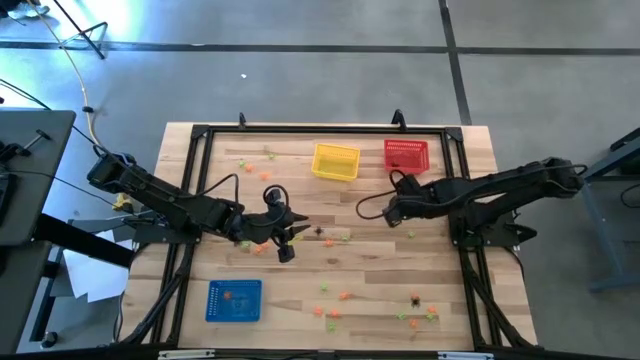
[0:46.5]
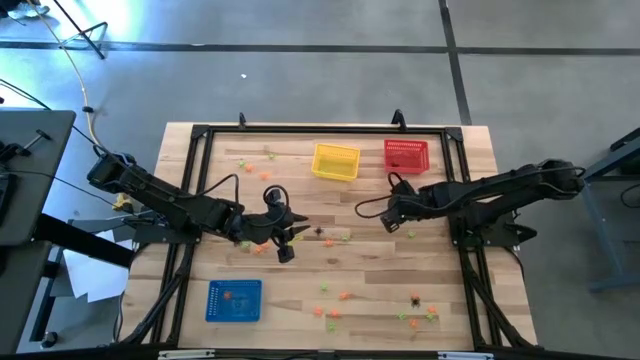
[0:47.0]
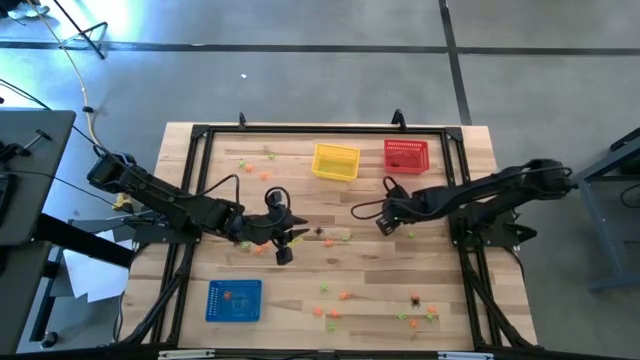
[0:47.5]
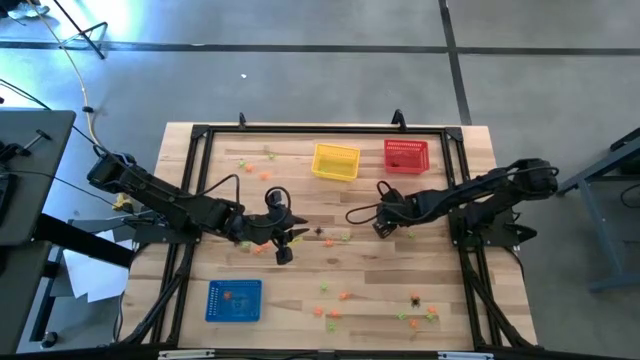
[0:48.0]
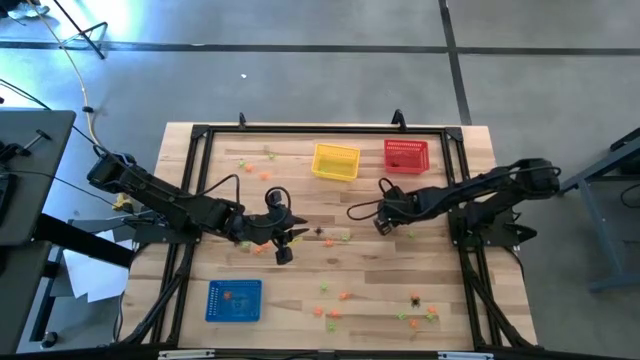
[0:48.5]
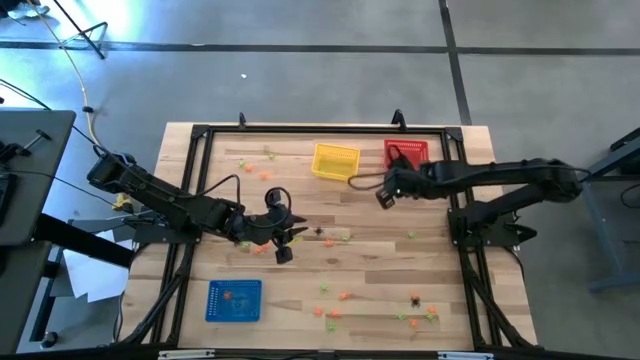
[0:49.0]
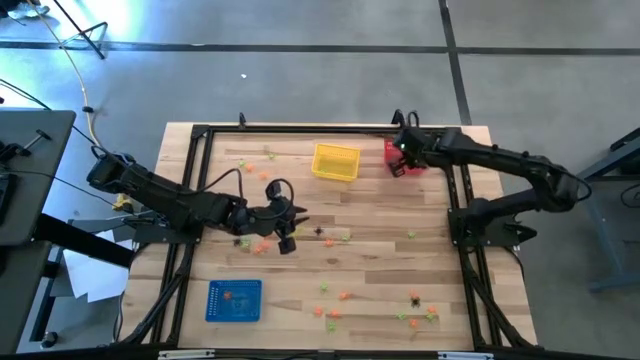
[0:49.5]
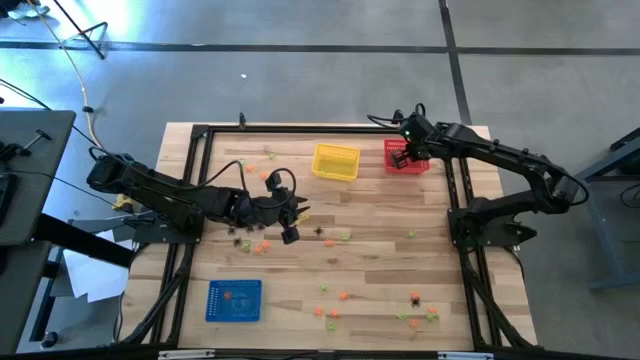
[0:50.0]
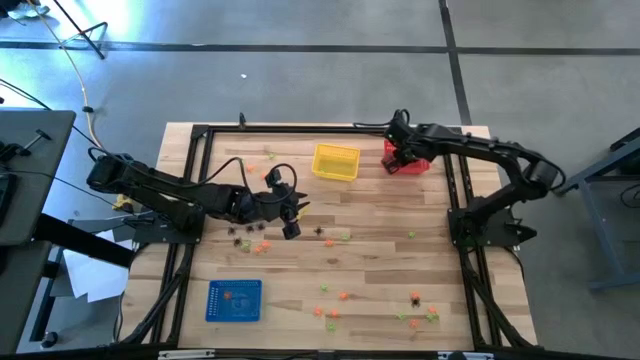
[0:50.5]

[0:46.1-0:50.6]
Task: Sort Halloween decoration
Put the black spider toy into the red bin

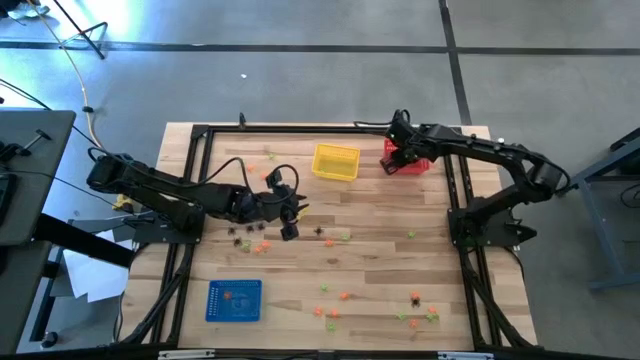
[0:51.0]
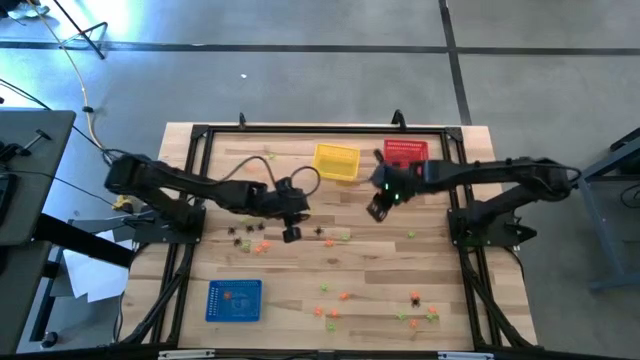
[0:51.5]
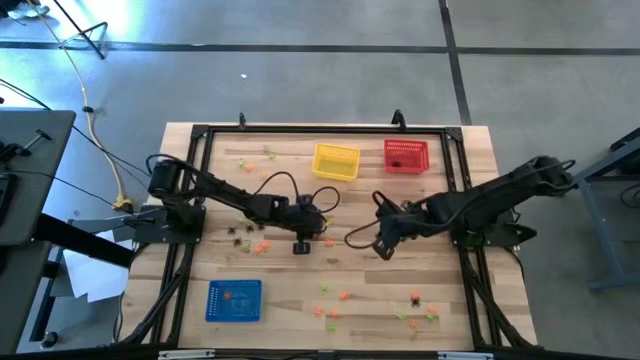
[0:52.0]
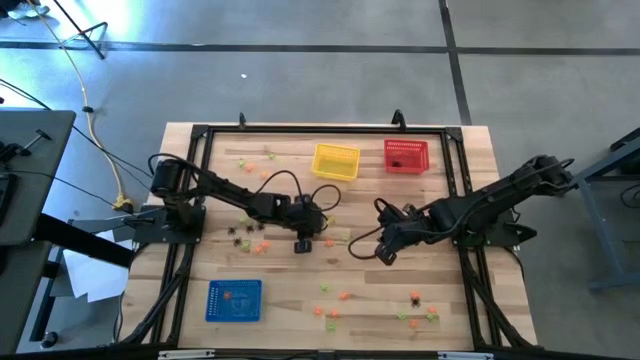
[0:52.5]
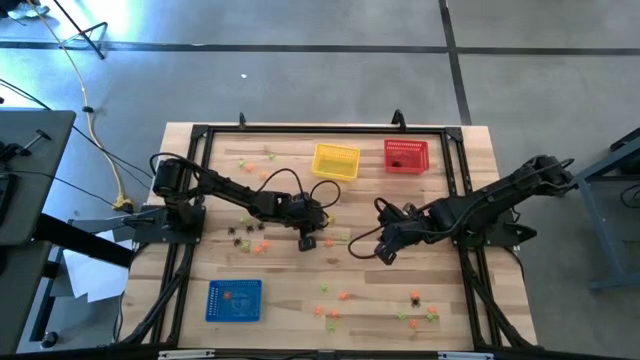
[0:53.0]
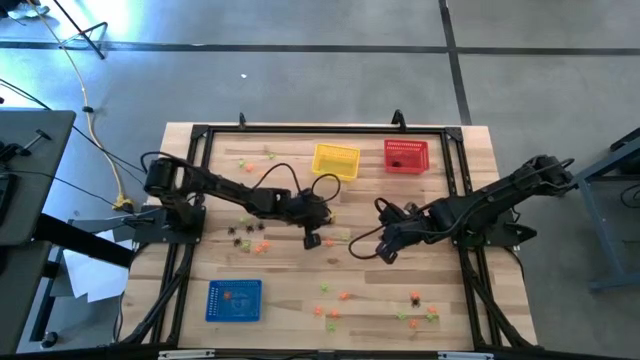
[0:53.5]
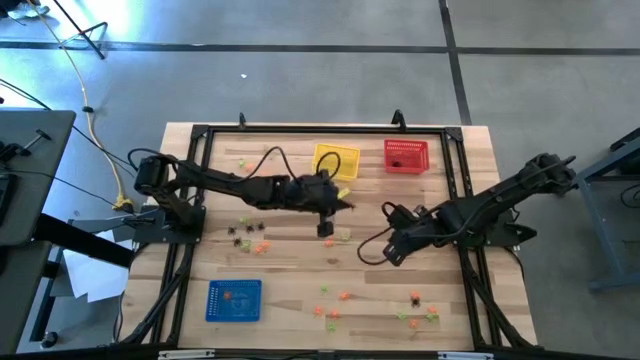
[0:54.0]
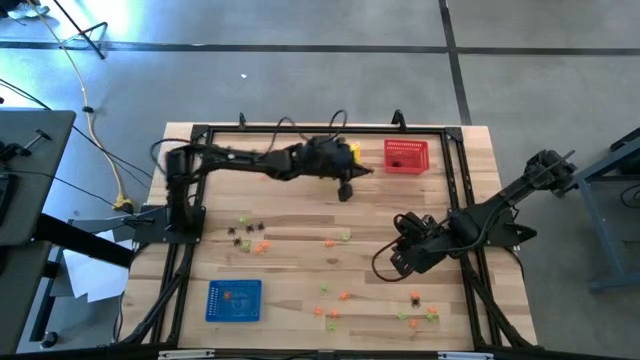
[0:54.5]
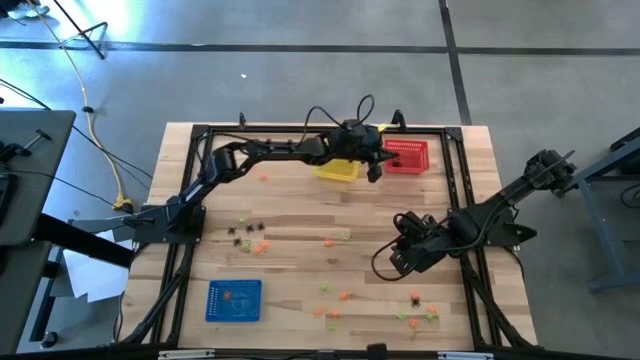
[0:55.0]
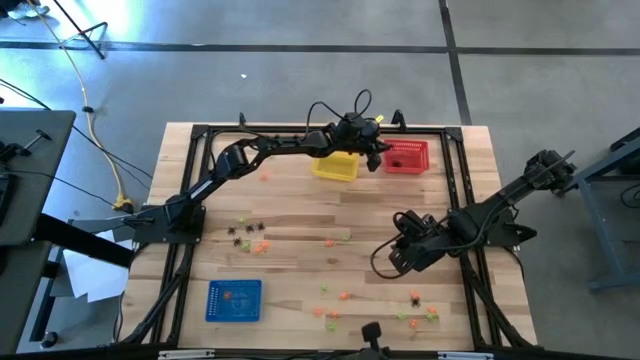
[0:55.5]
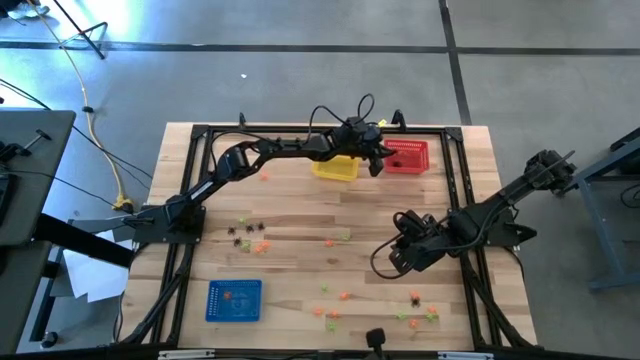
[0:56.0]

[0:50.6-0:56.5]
Put the black spider toy into the red bin

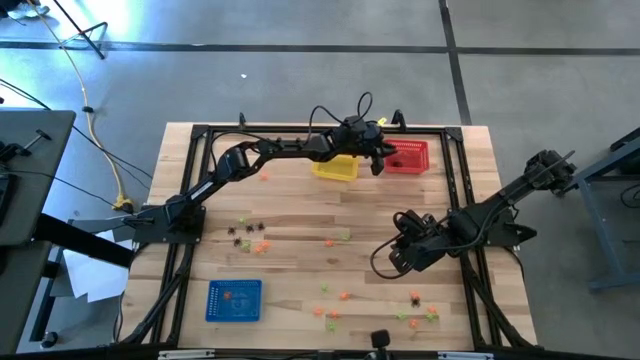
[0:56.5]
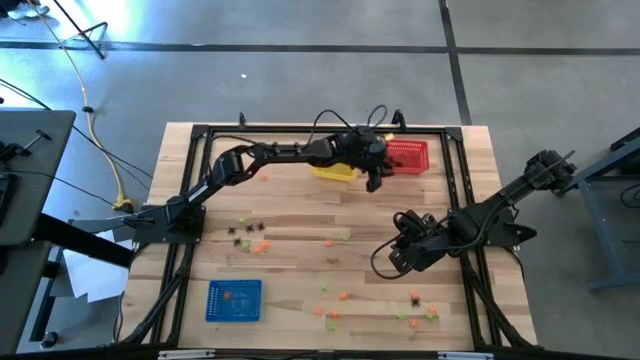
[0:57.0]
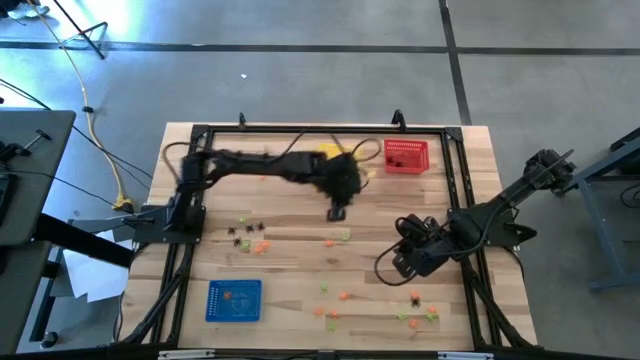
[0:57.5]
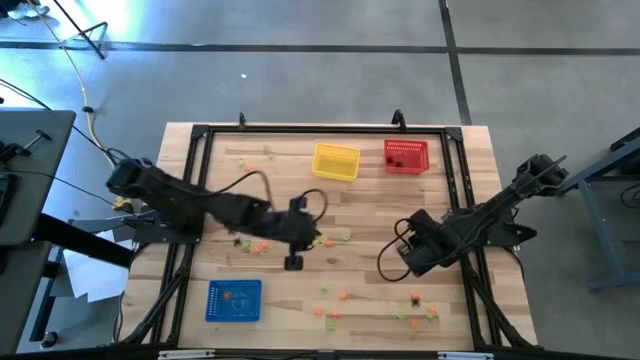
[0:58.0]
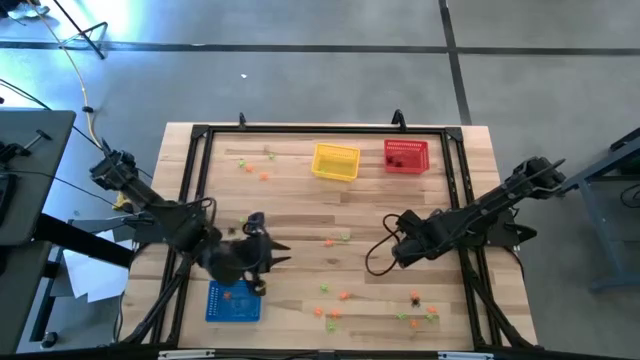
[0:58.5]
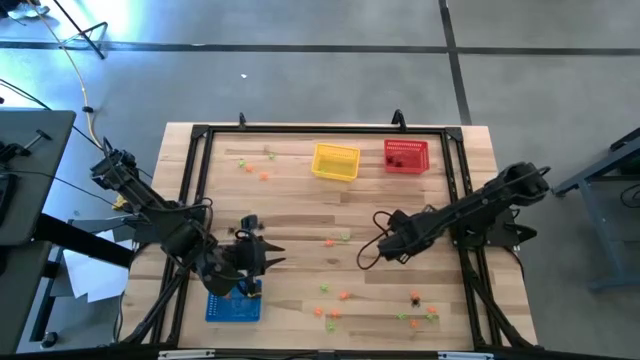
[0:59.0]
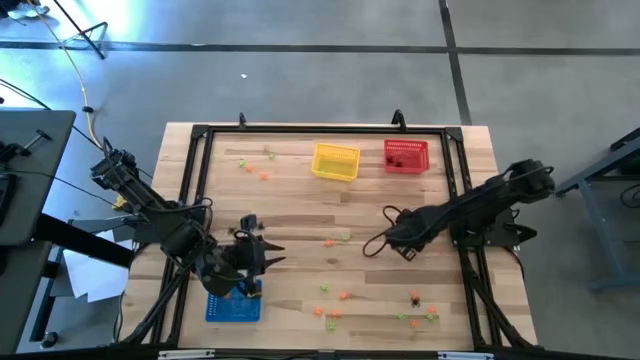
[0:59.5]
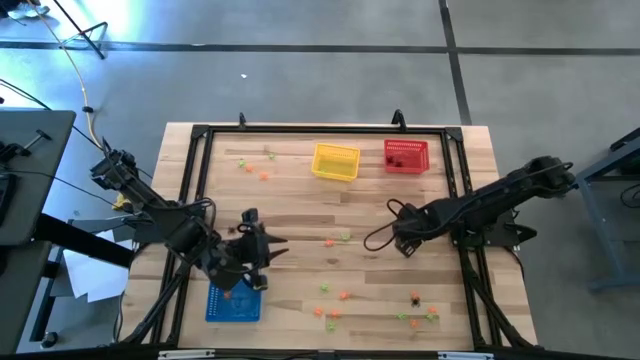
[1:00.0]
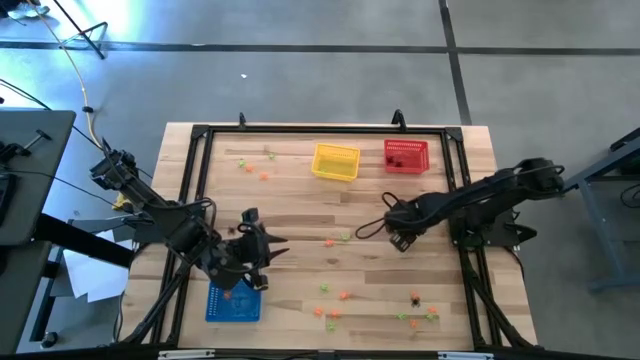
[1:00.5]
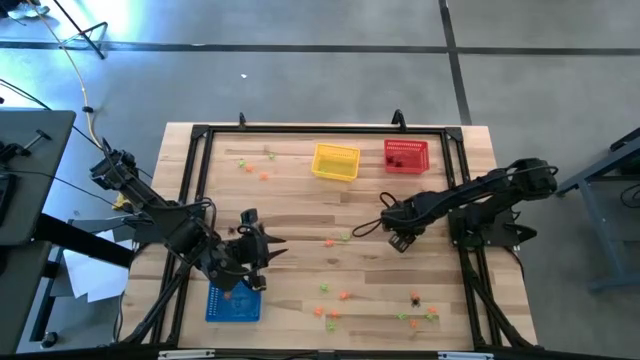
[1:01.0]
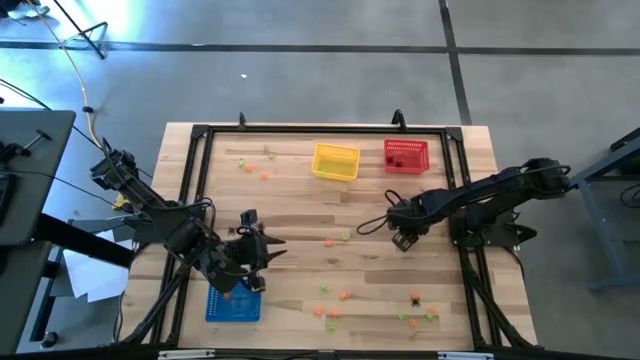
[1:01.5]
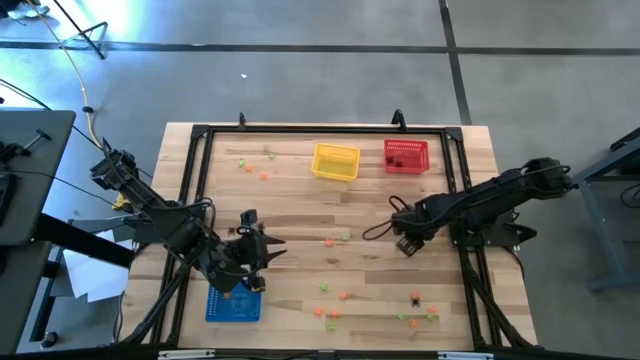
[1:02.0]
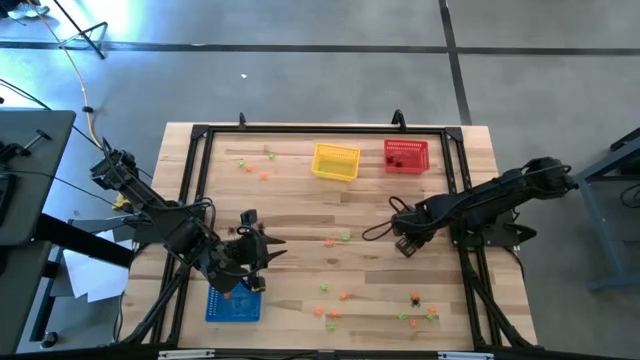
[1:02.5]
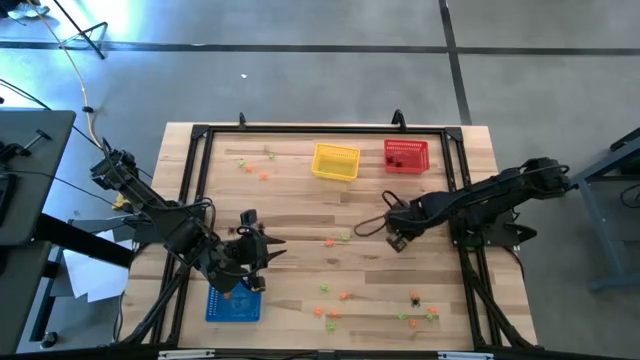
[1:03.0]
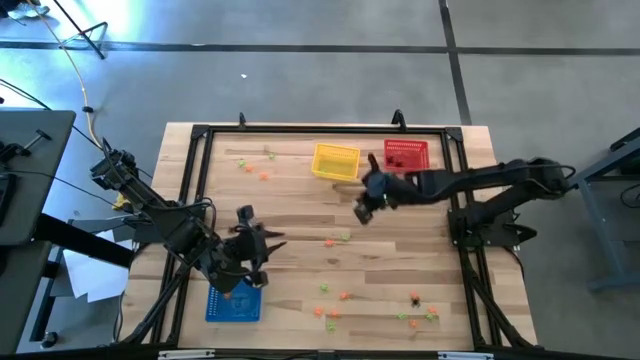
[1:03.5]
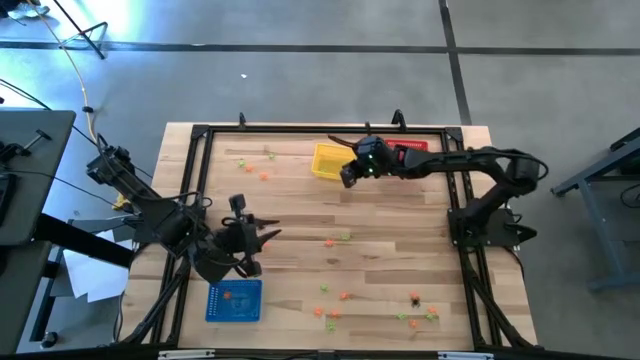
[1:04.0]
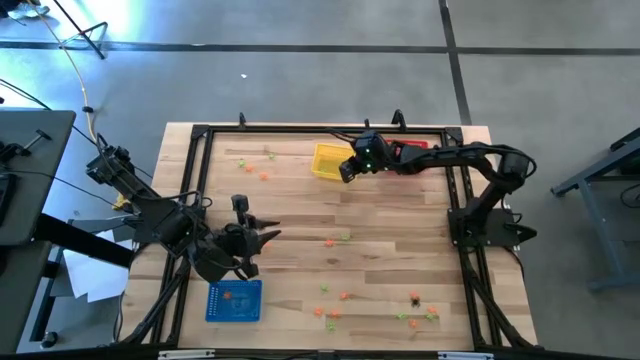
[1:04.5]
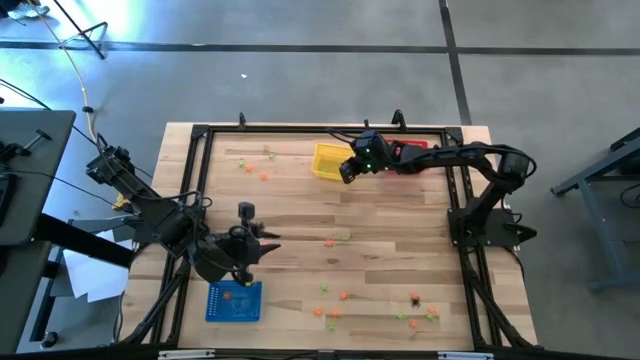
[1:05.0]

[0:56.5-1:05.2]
Put the green spider toy into the yellow bin

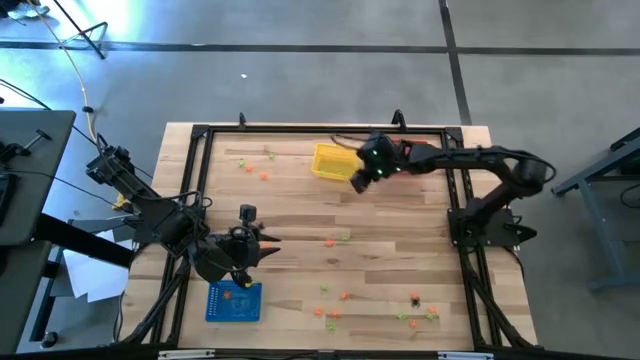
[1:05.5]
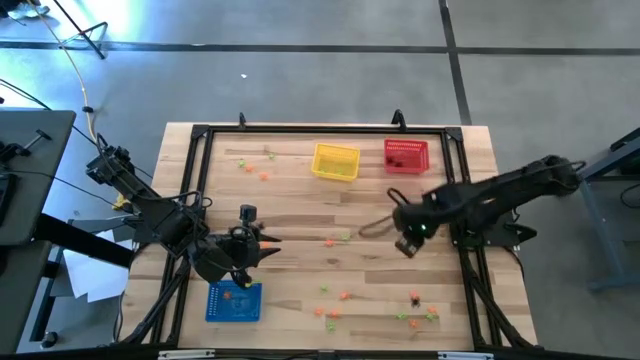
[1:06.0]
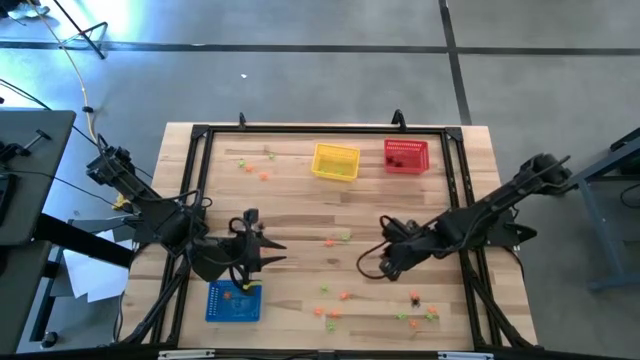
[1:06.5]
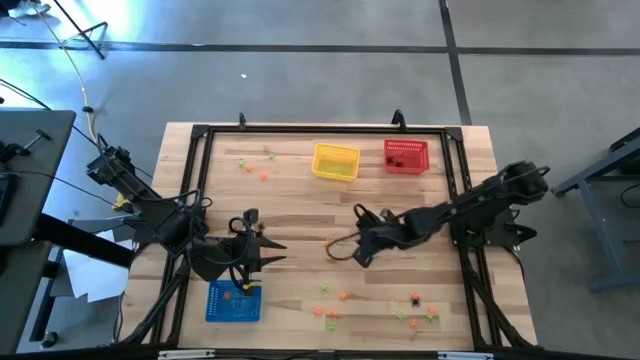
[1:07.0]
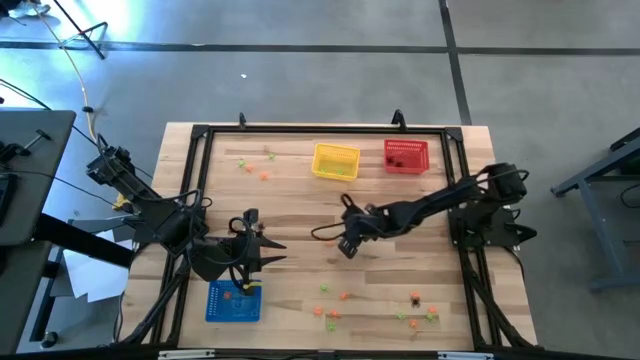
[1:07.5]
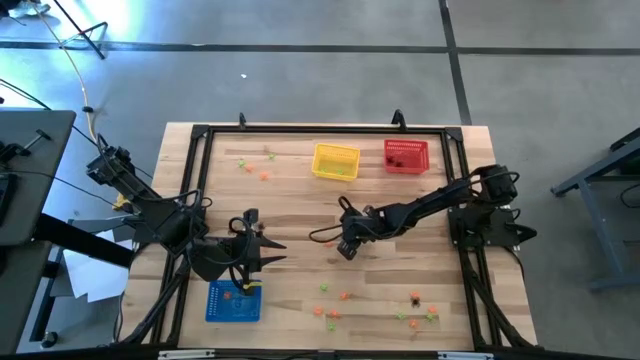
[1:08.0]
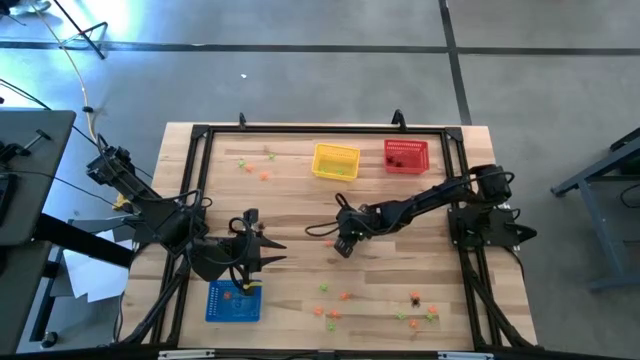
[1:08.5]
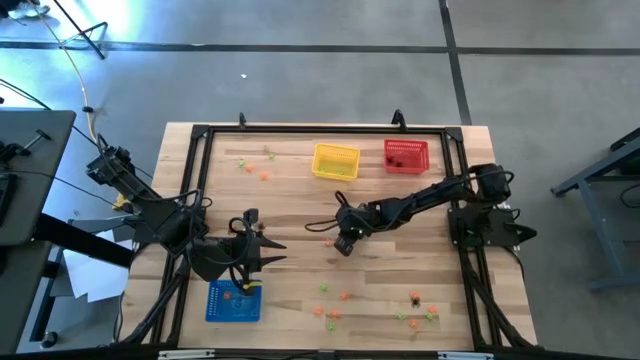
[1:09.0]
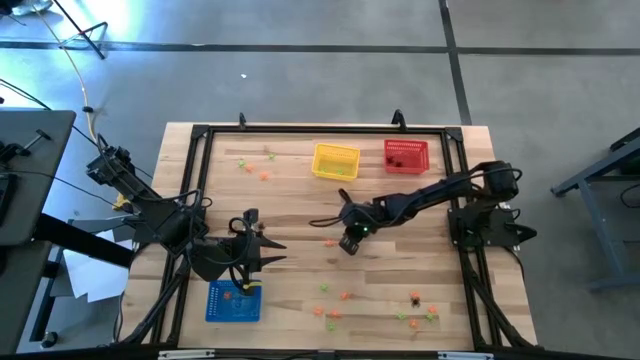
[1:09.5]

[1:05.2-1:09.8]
Put the spider toy into the yellow bin
